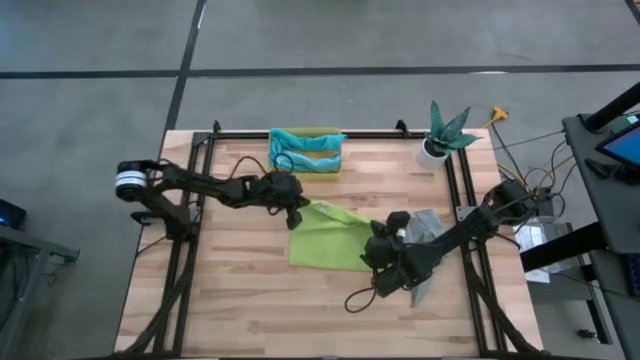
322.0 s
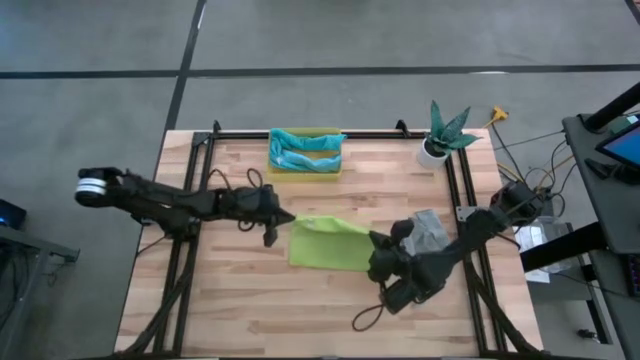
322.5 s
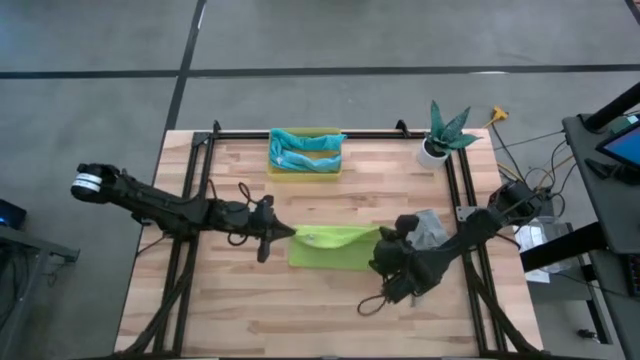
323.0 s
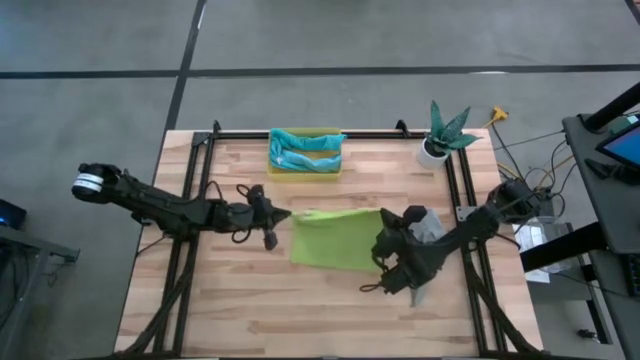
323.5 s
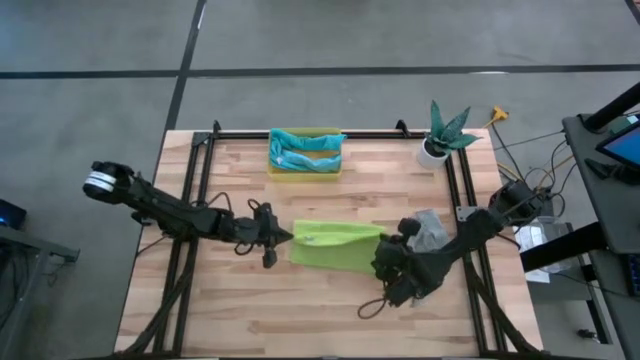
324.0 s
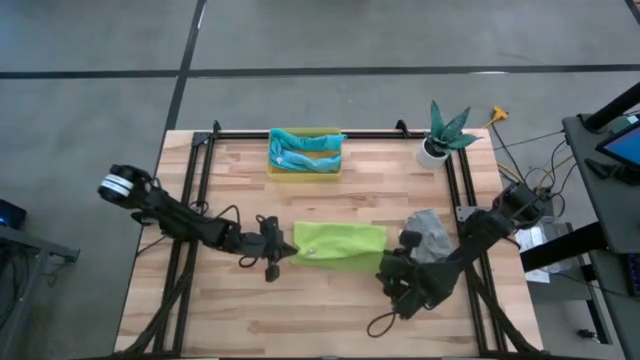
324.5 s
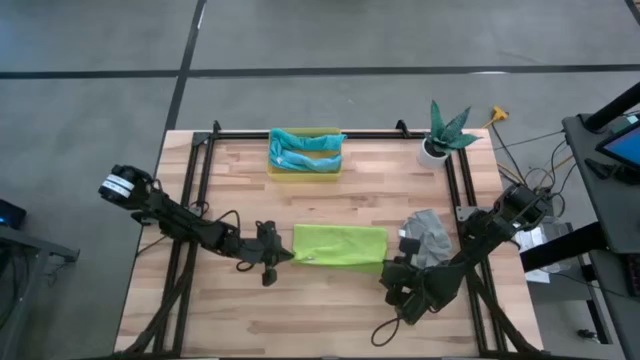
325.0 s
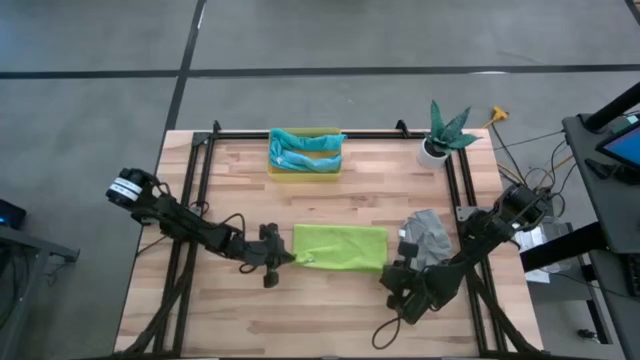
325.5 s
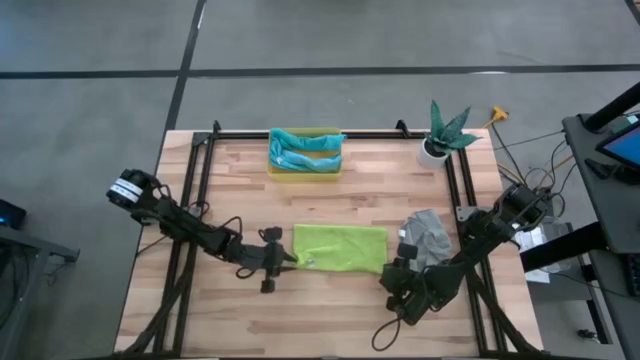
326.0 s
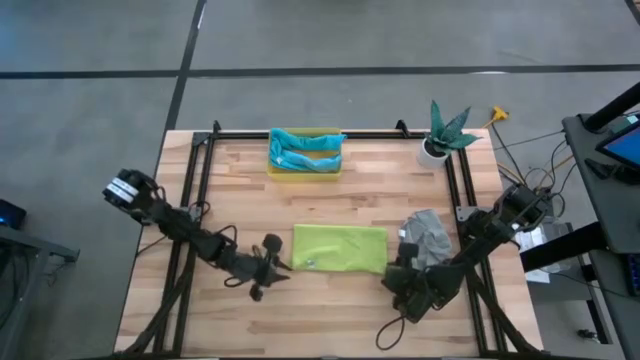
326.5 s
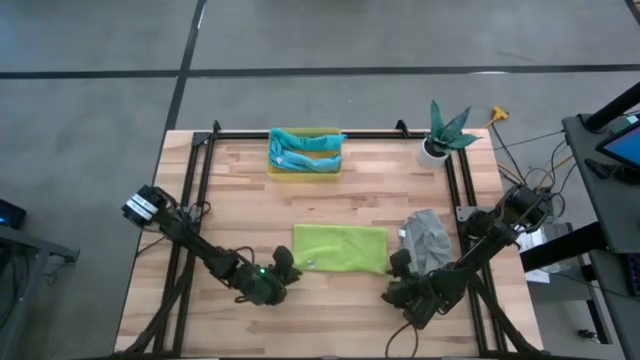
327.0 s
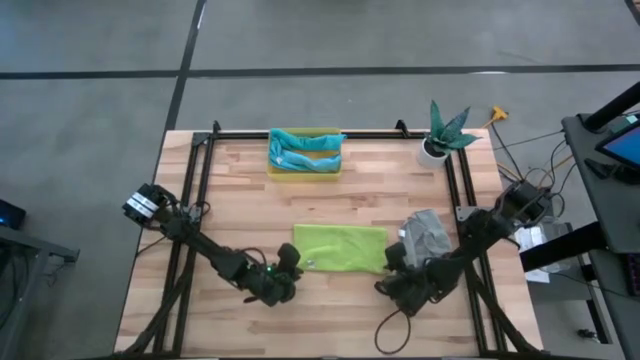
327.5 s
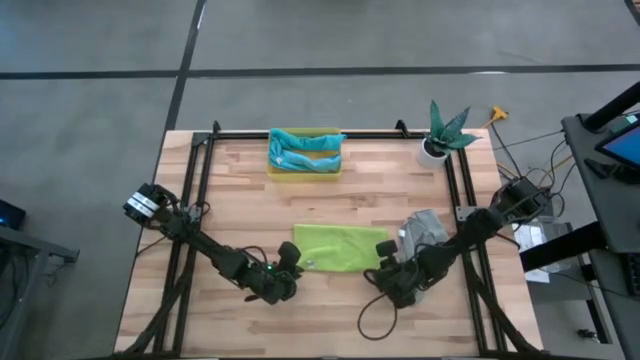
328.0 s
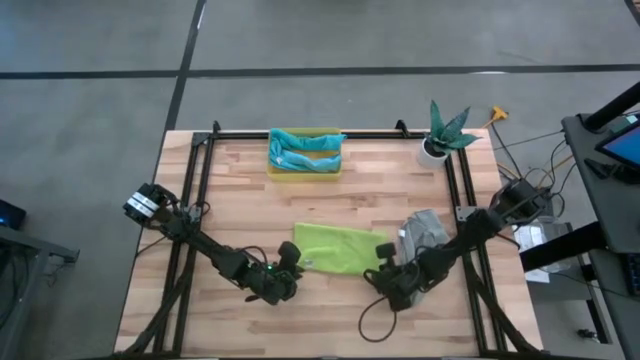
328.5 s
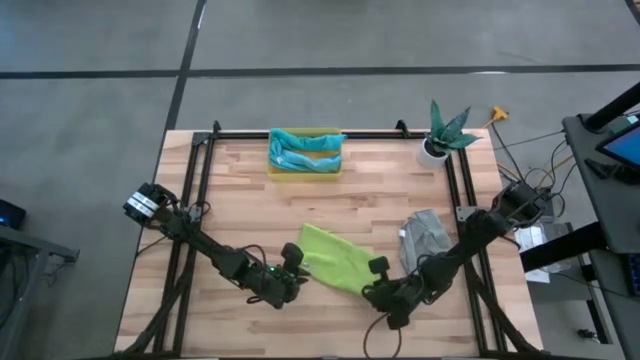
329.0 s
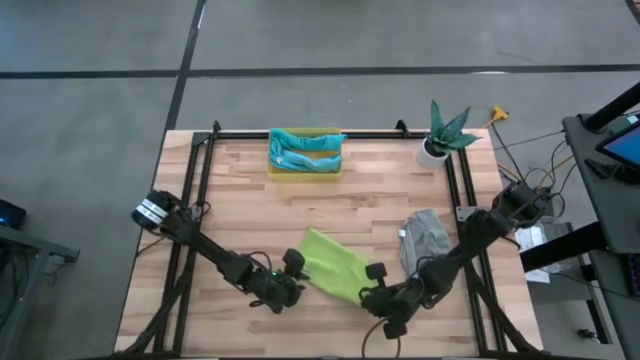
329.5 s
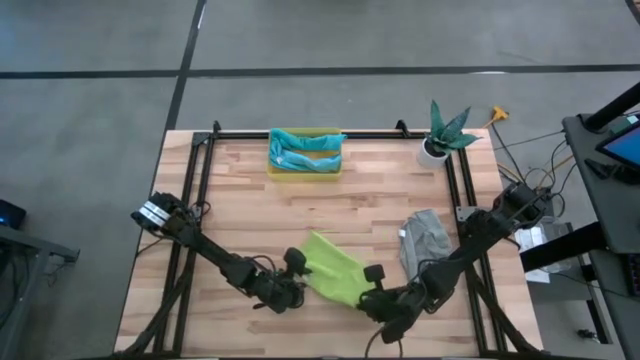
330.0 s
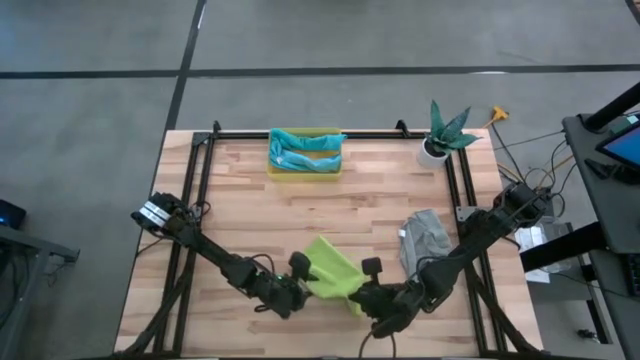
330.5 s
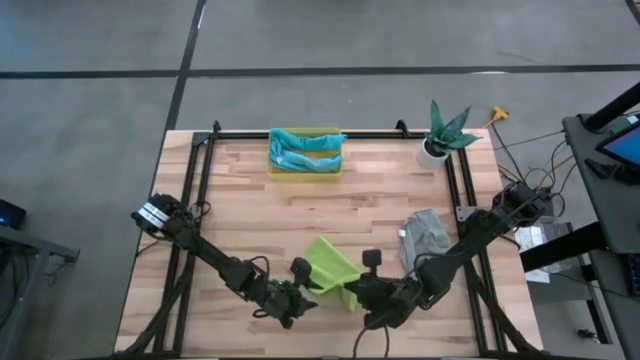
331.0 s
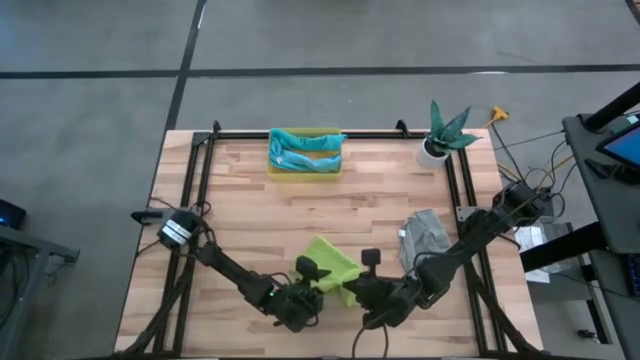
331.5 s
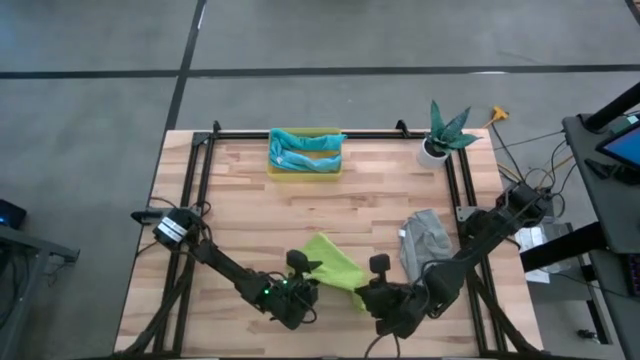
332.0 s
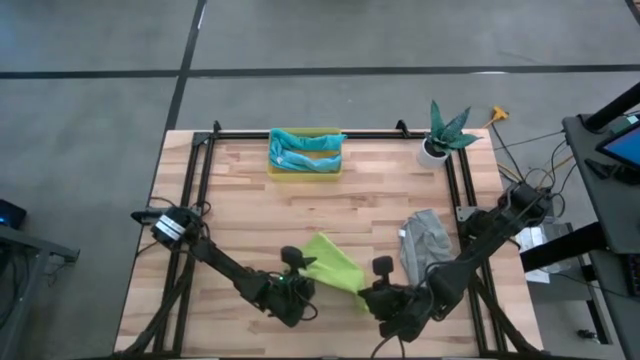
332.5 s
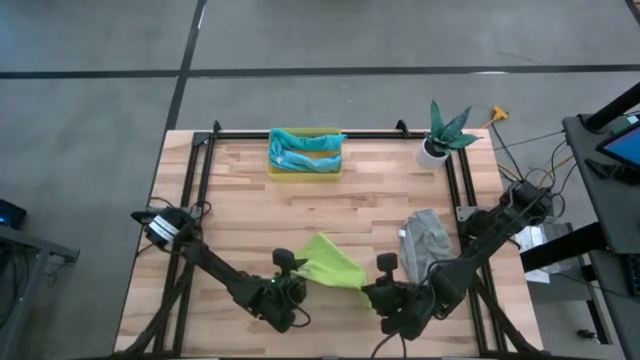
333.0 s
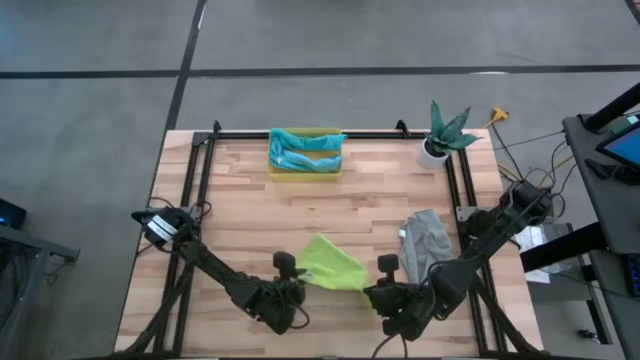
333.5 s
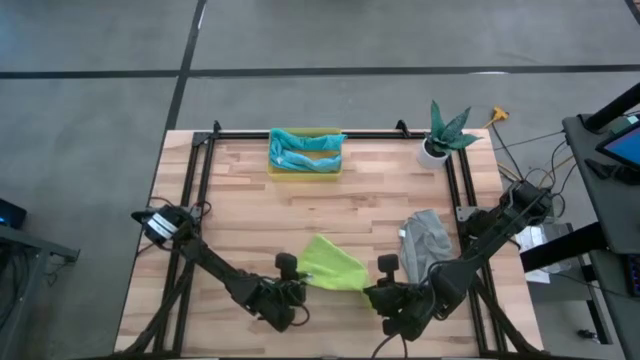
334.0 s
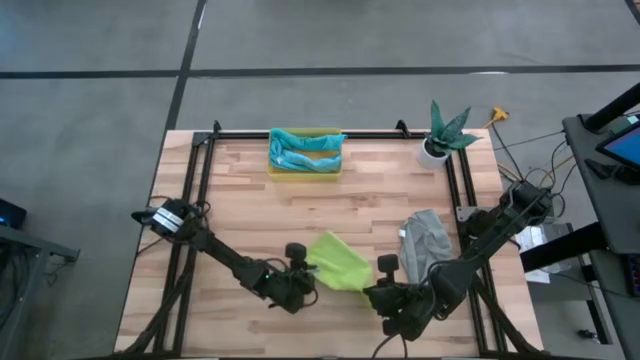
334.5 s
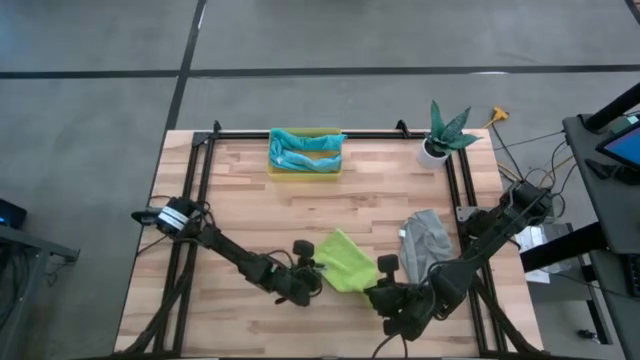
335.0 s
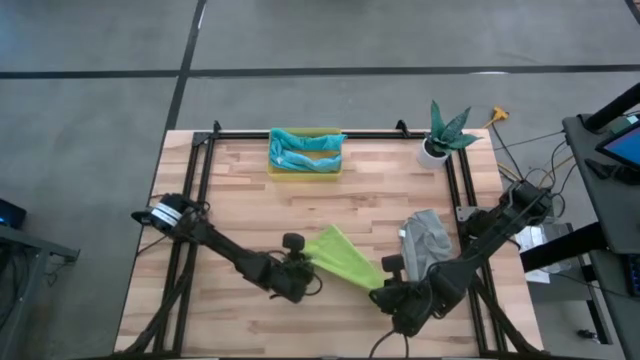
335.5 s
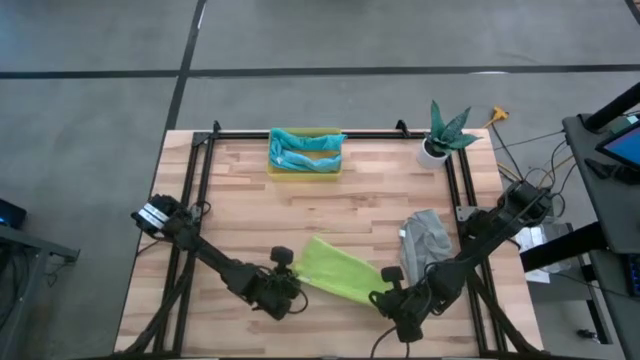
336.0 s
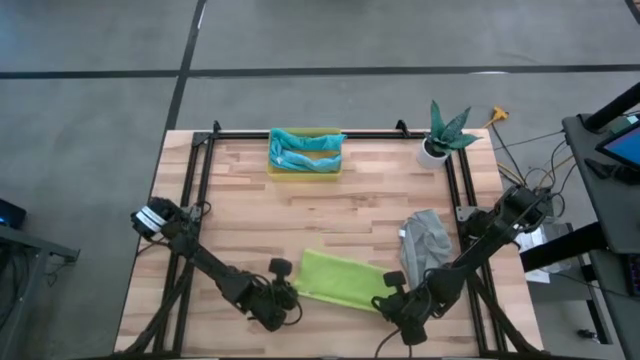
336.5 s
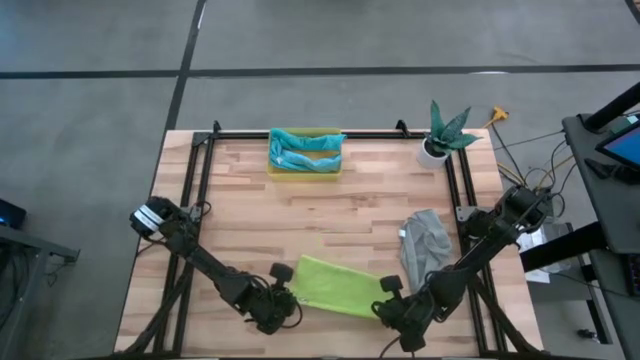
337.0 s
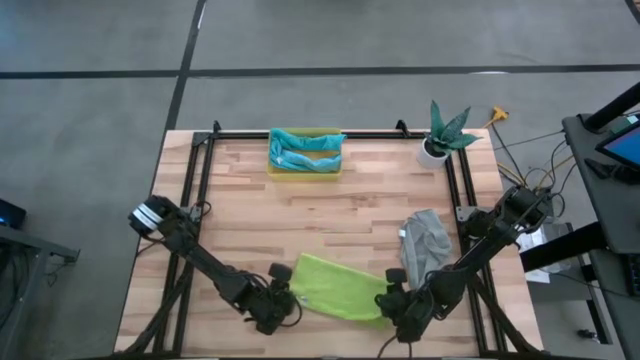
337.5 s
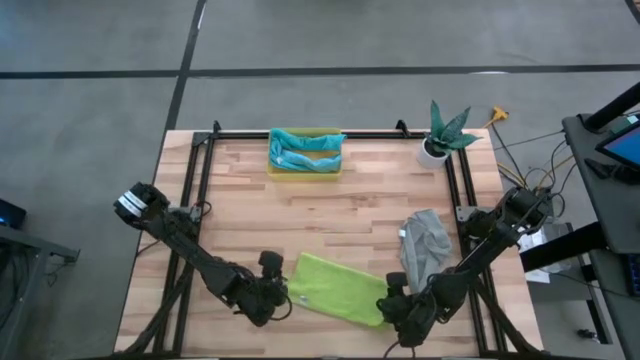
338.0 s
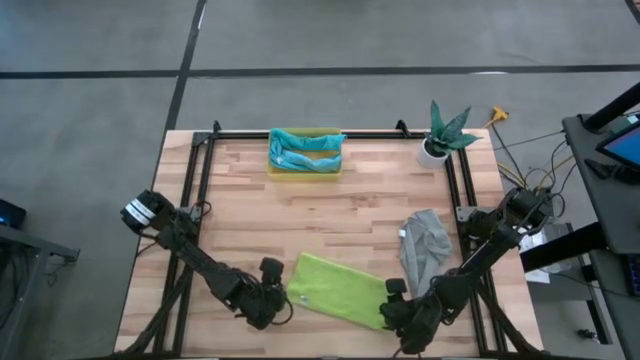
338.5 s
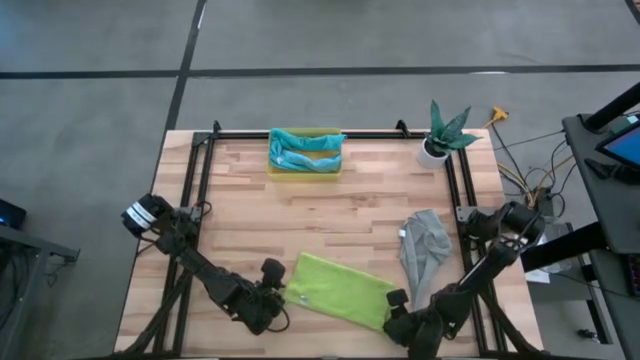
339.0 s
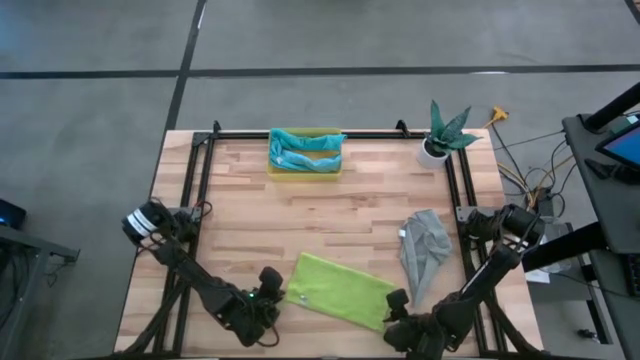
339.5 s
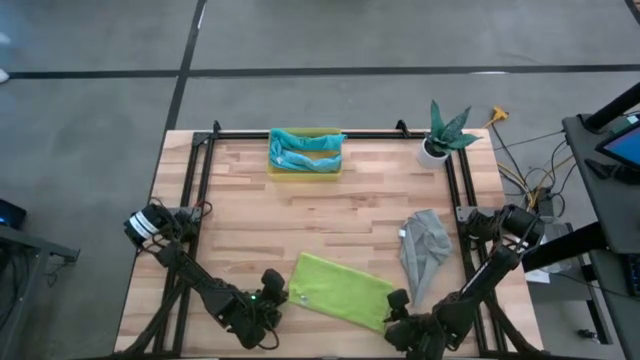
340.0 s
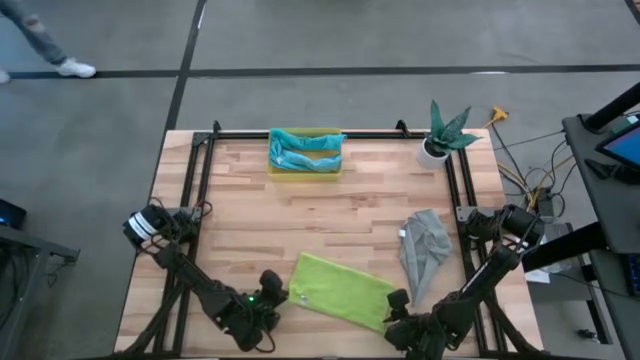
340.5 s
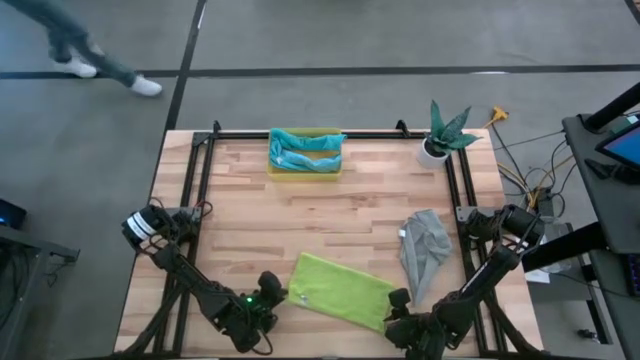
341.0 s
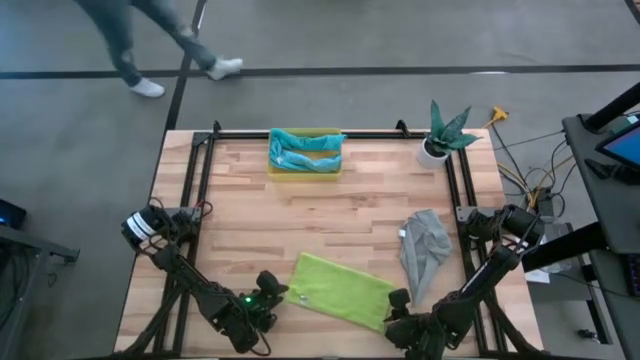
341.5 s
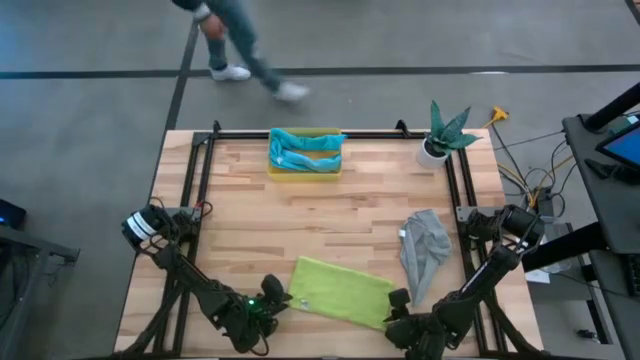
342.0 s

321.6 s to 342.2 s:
Task: Roll microfiber towels into tight, uniform cylinder then place into a basket
Roll the green towel
